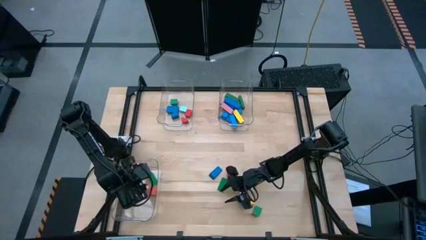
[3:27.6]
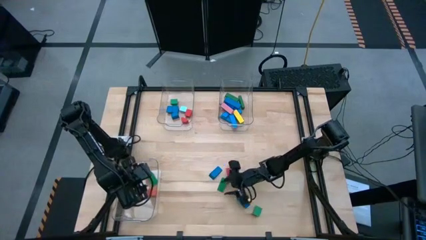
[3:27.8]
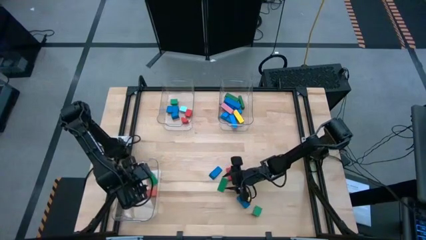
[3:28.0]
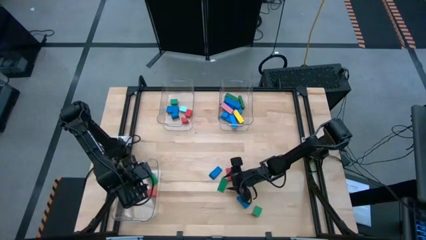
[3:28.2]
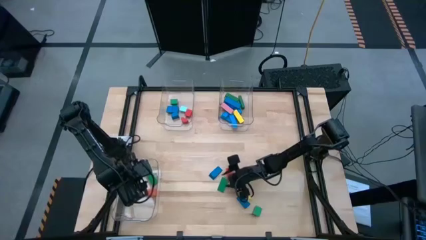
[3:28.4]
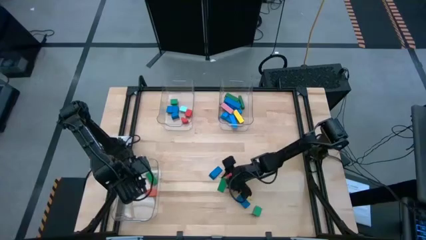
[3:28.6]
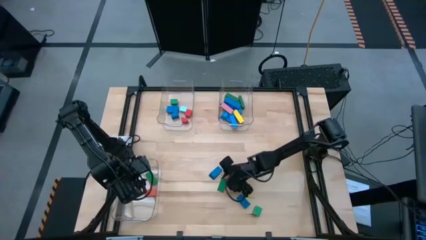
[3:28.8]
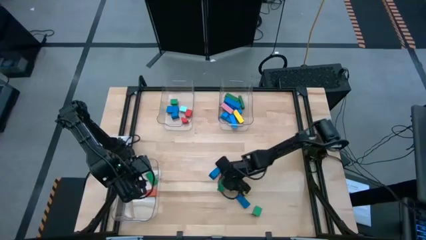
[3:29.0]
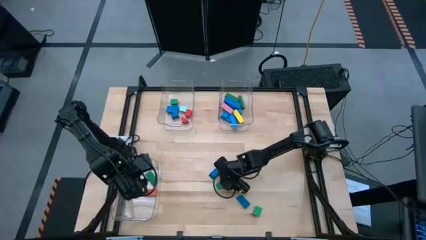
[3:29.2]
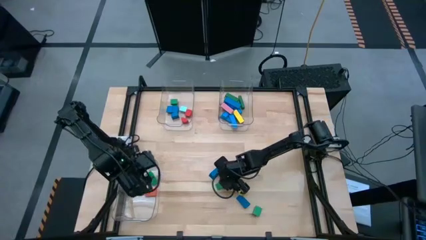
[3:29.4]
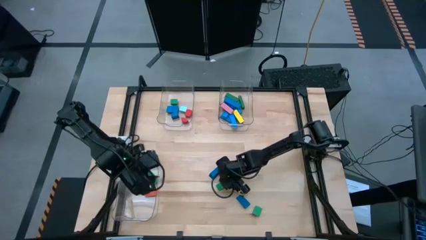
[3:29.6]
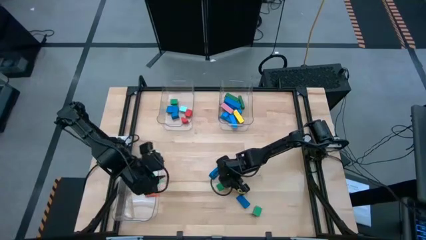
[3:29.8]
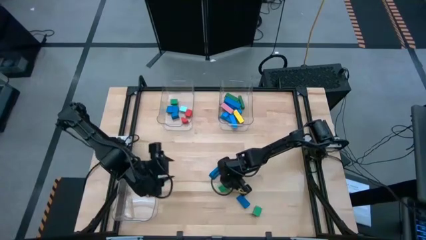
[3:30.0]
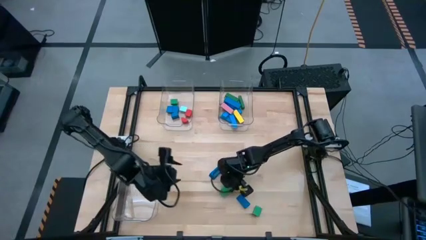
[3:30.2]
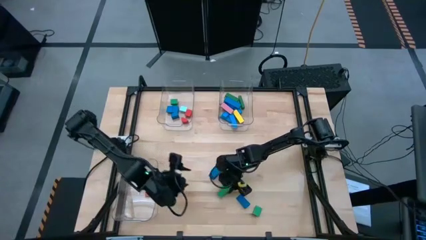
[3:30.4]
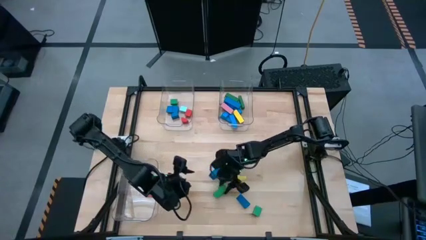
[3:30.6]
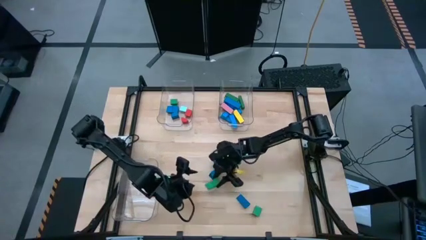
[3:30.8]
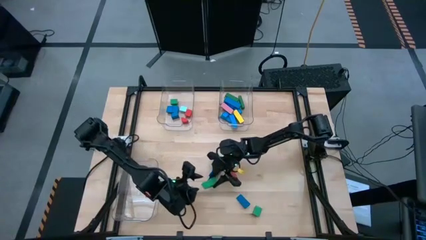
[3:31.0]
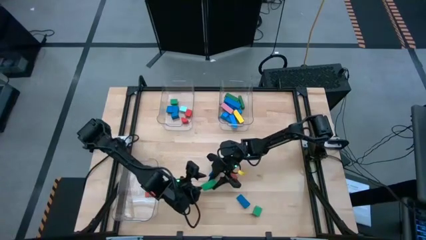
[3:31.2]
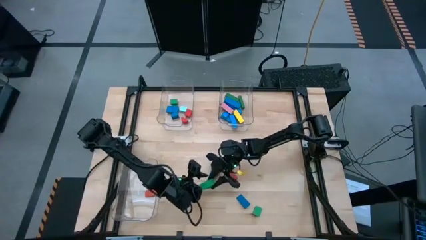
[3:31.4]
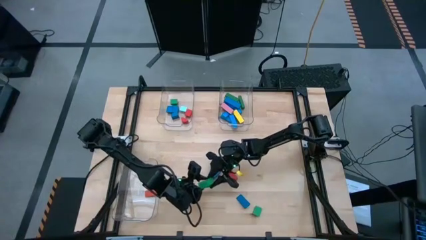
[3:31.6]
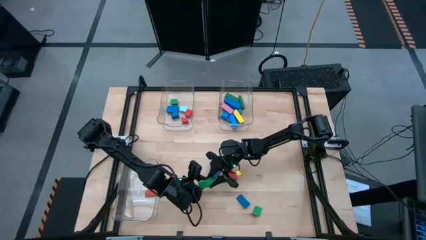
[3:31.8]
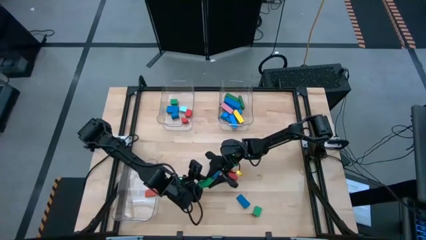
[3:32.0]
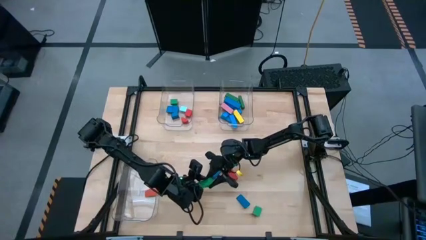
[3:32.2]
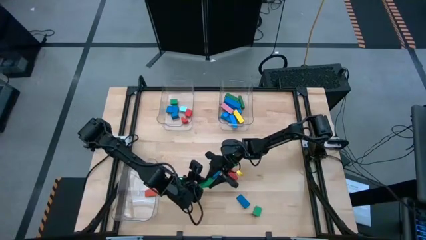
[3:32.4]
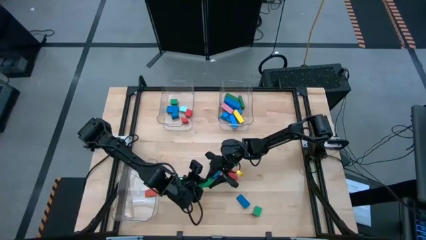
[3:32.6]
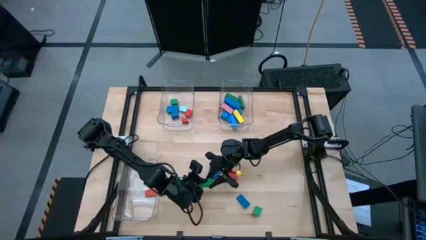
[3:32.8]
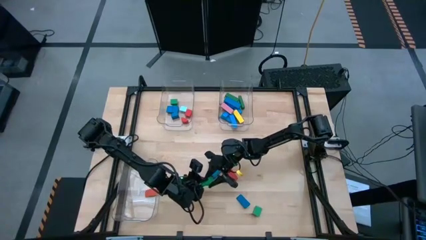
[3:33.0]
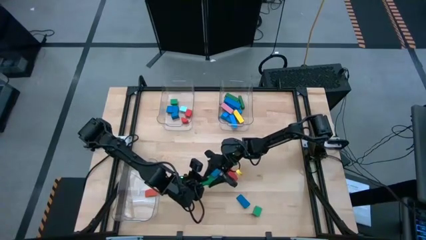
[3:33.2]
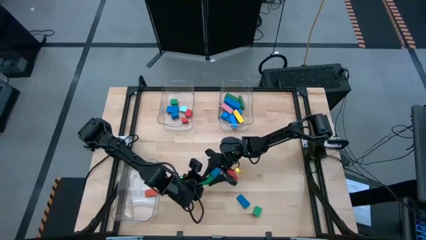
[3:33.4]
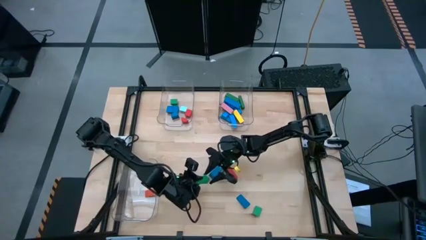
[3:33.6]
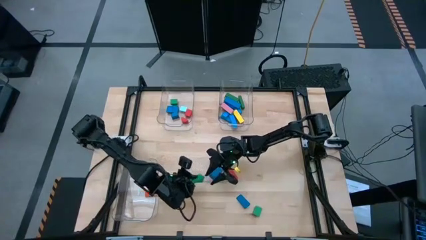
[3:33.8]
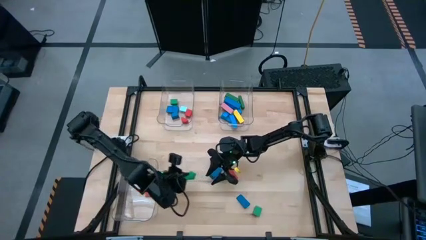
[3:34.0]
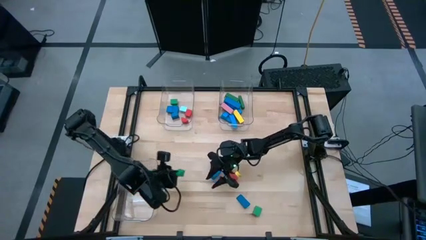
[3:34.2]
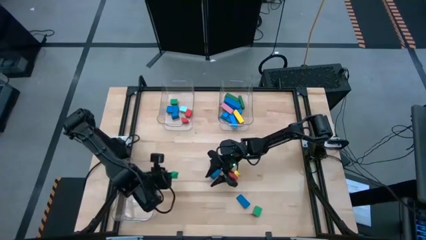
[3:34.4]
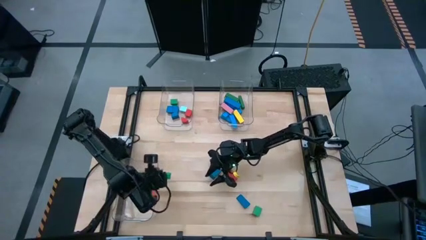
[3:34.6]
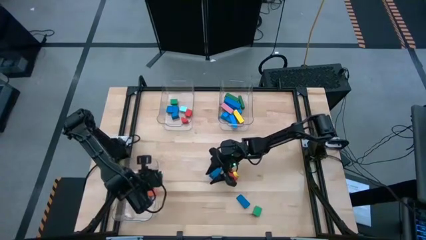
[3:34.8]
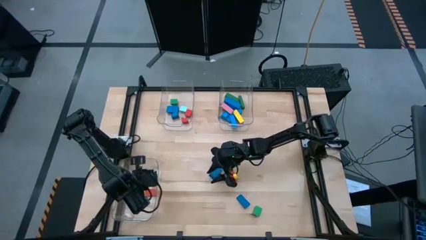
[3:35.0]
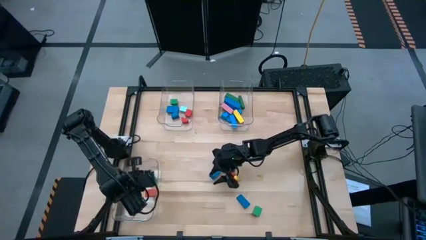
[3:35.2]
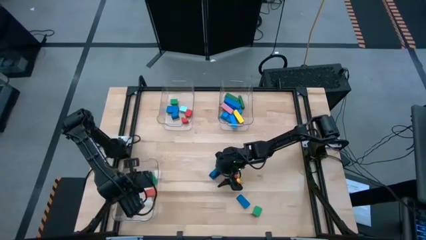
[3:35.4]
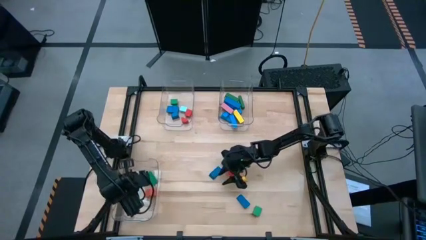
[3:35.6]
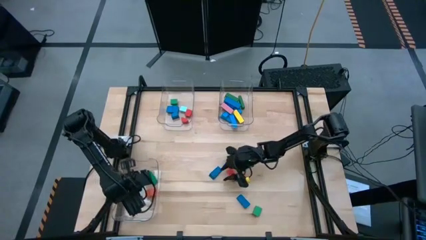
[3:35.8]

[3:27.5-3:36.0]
Task: Sort blocks by size
Put the green triangular block into the bottom transparent bin

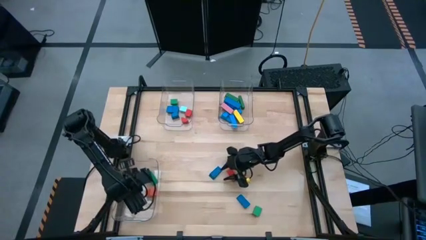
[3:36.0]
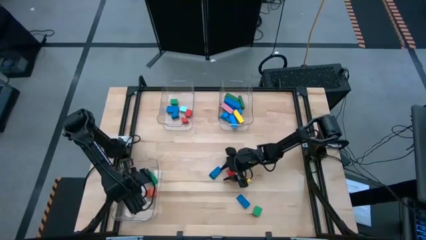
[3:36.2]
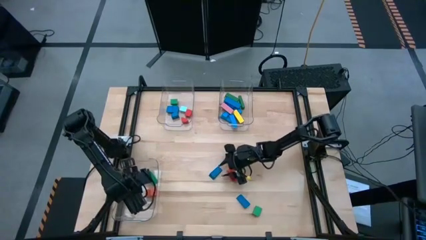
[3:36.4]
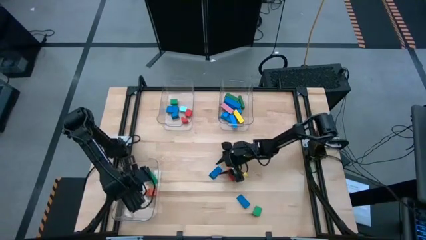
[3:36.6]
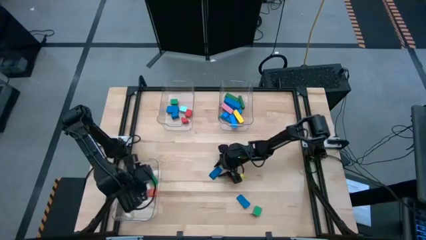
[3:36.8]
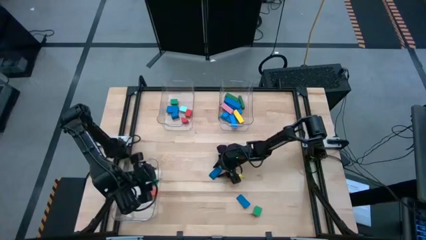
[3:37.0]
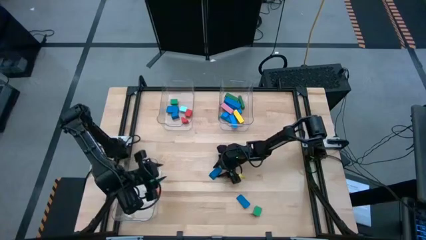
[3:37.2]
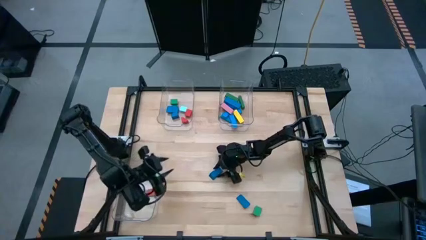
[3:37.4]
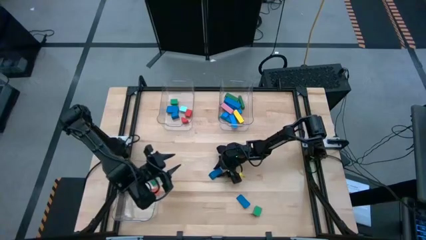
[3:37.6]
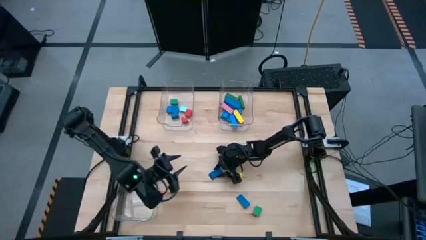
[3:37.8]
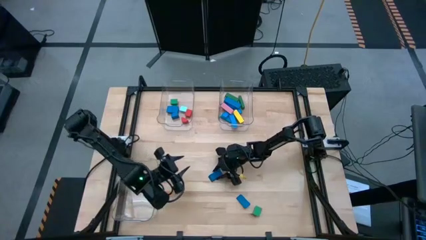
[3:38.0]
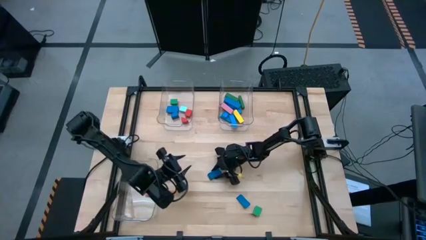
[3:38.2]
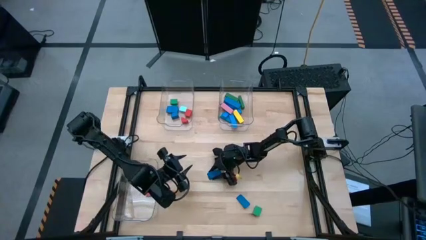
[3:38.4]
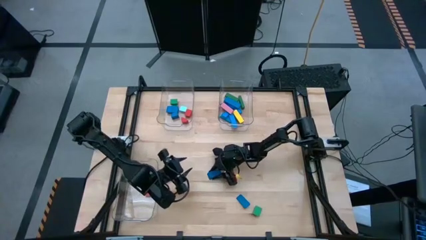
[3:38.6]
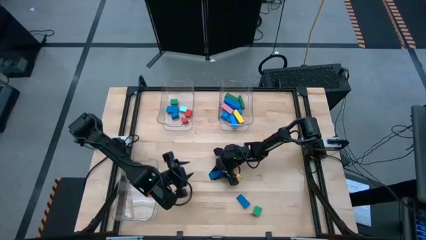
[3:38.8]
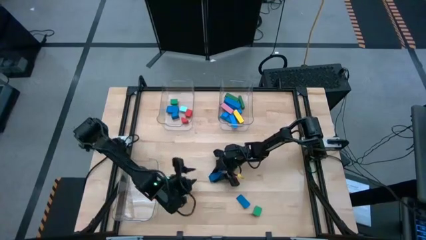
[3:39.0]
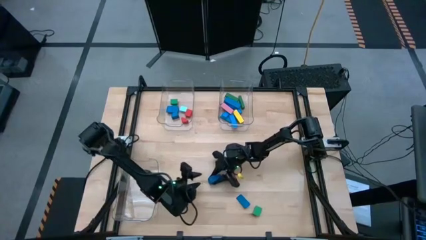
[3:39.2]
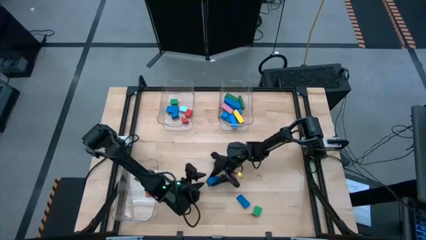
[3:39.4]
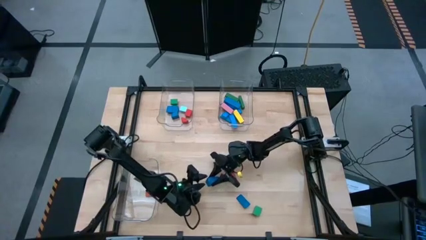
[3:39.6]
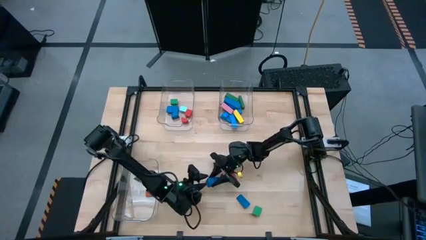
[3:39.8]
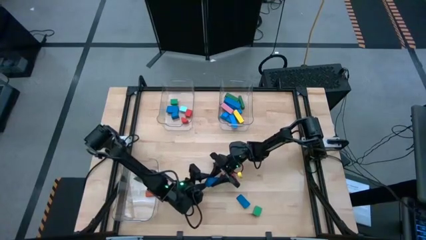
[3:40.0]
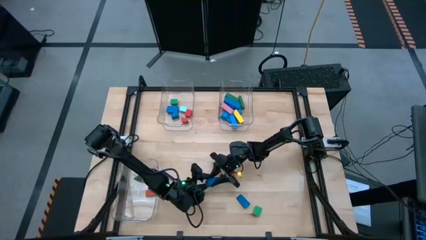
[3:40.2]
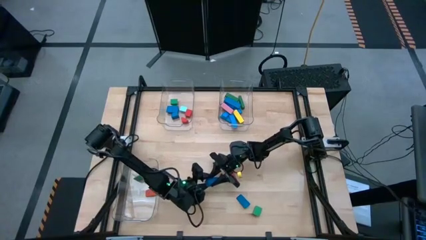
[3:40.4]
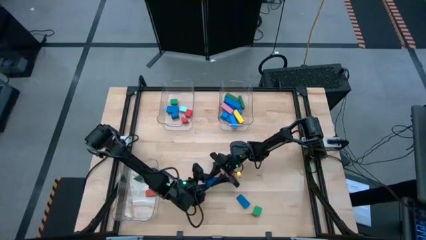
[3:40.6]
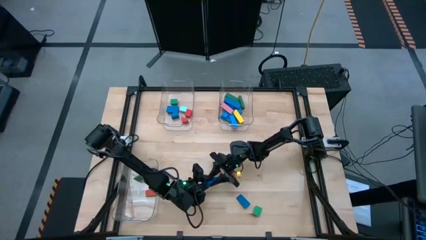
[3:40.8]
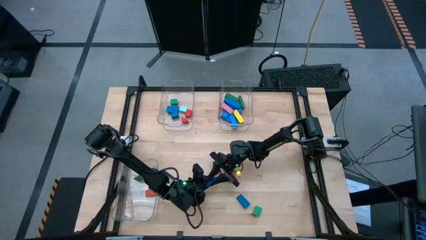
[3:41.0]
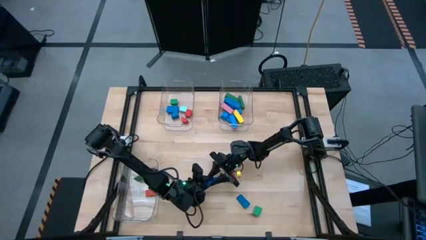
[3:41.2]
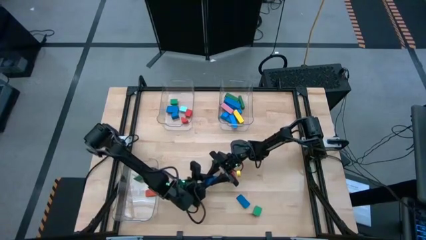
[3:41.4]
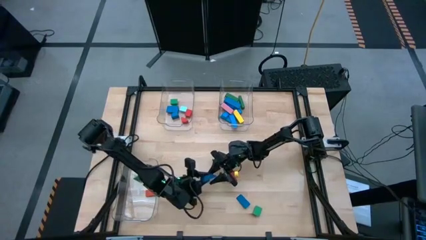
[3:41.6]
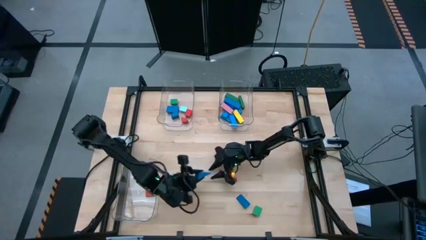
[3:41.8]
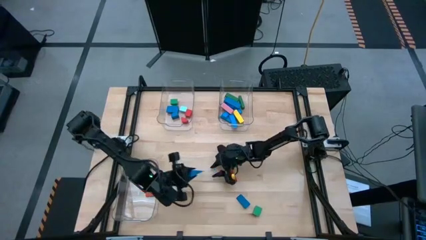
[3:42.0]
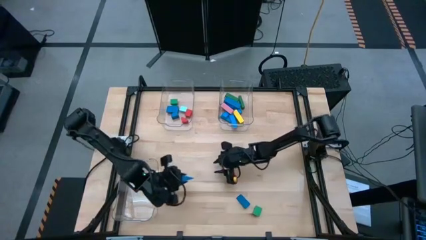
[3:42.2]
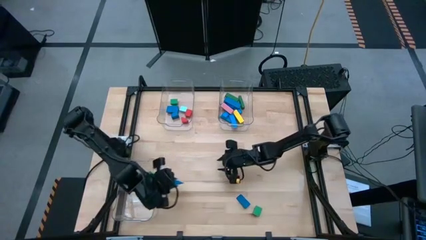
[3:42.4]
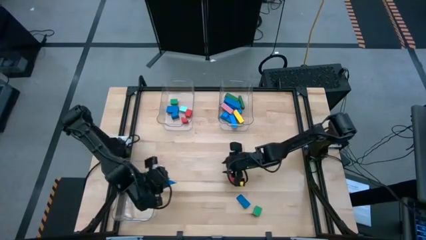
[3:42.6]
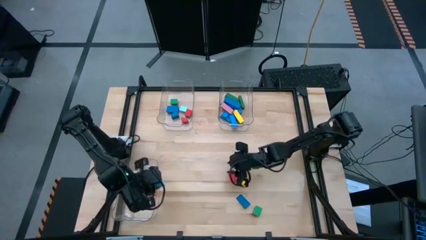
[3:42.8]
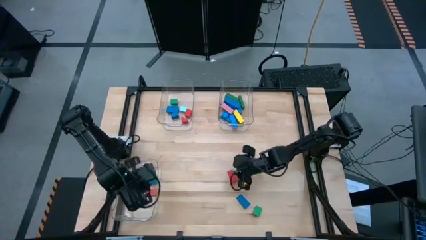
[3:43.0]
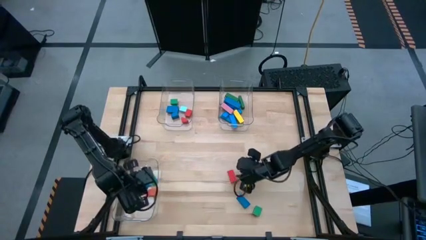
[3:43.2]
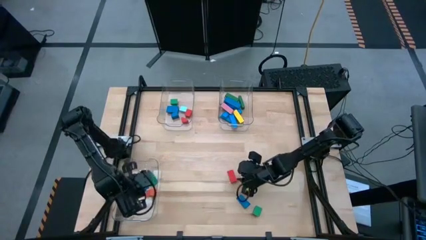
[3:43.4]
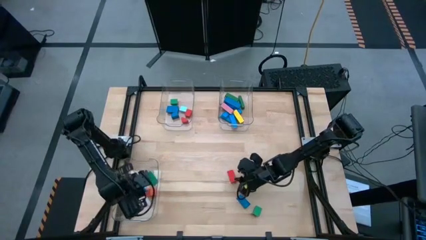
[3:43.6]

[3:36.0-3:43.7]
Put the blue triangular block into the bottom transparent bin

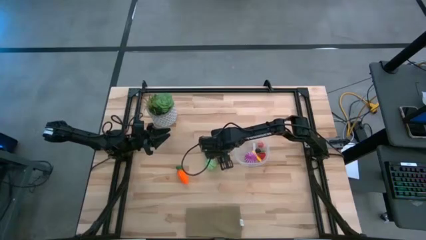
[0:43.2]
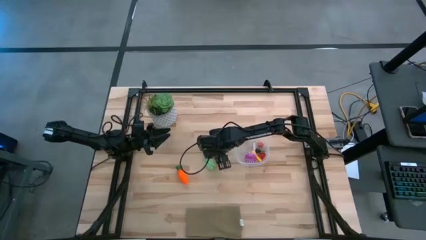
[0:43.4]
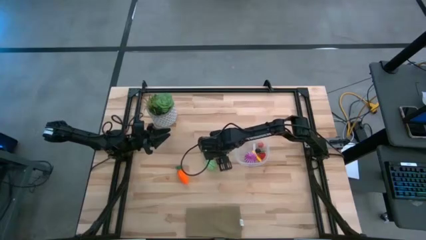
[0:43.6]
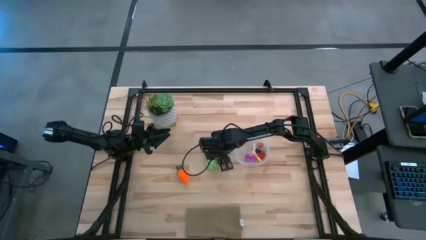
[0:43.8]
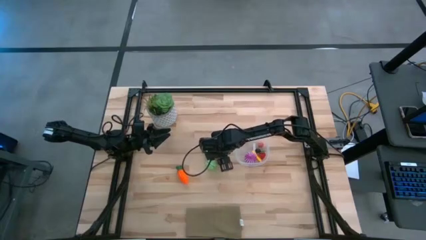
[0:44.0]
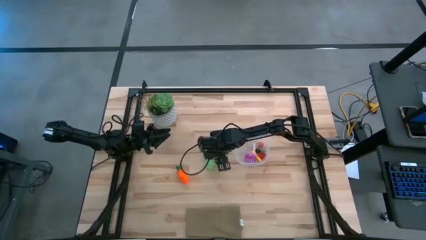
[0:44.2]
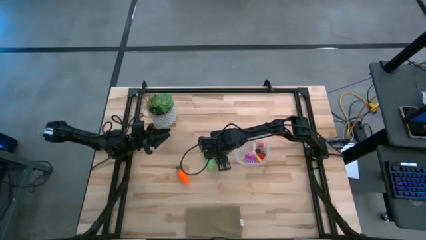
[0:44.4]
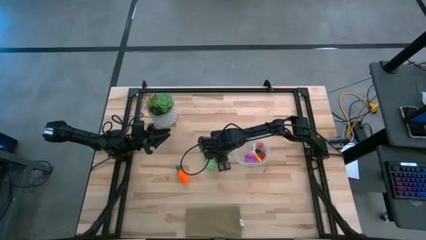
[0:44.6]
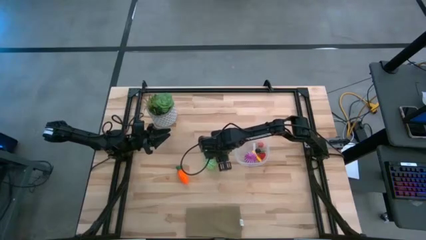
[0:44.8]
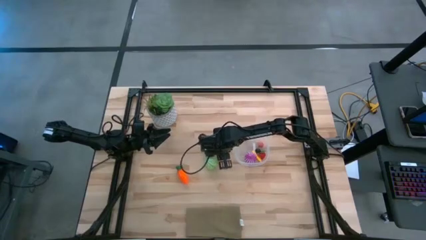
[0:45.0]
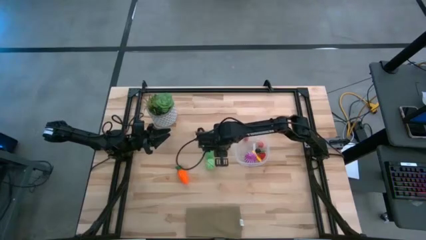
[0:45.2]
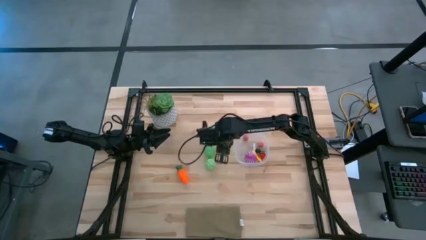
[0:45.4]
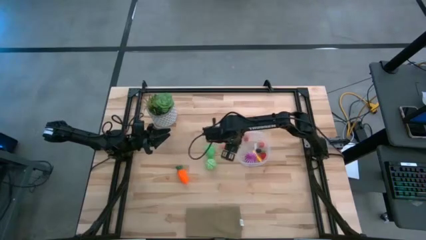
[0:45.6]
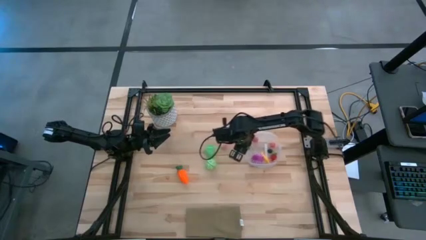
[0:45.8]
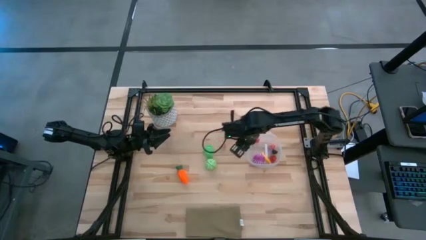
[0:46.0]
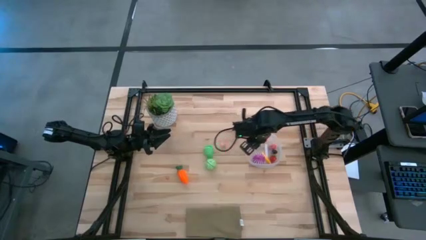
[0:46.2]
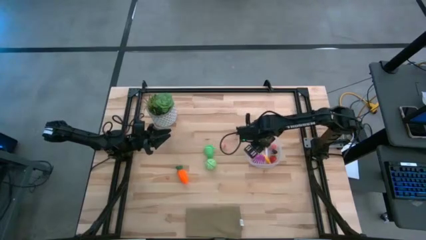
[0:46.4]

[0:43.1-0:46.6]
Task: Pick and placing Produce into tupperware
Put the red strawberry into the transparent container
